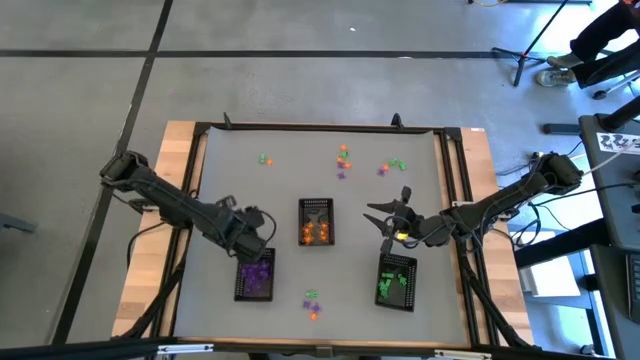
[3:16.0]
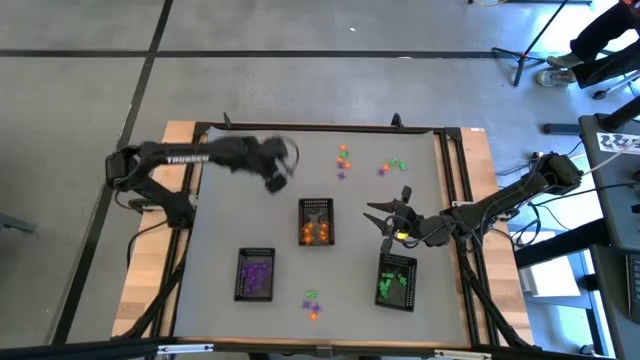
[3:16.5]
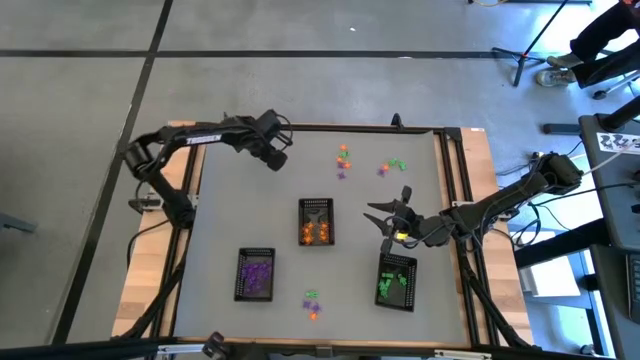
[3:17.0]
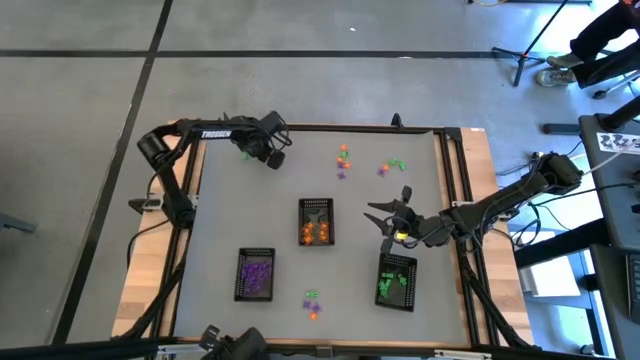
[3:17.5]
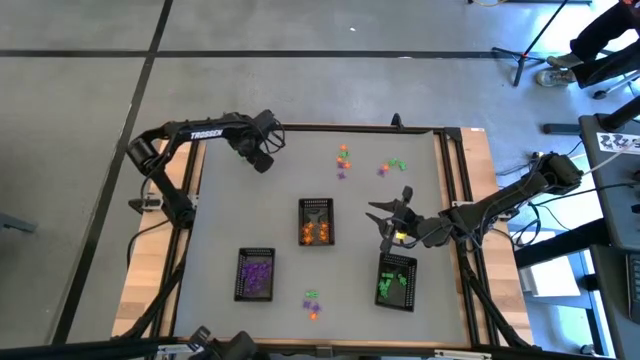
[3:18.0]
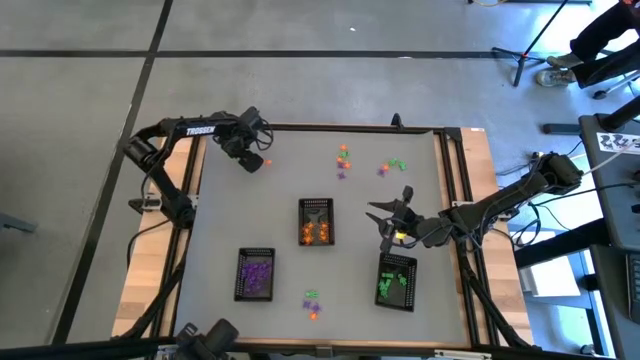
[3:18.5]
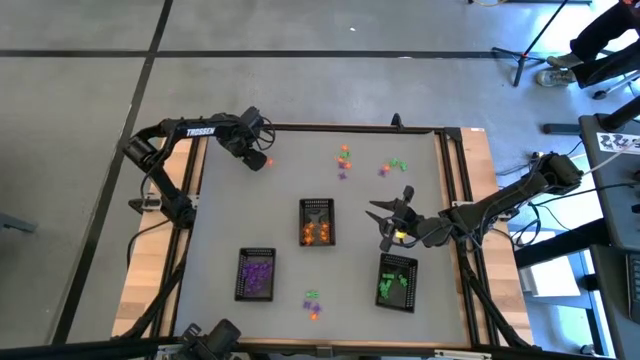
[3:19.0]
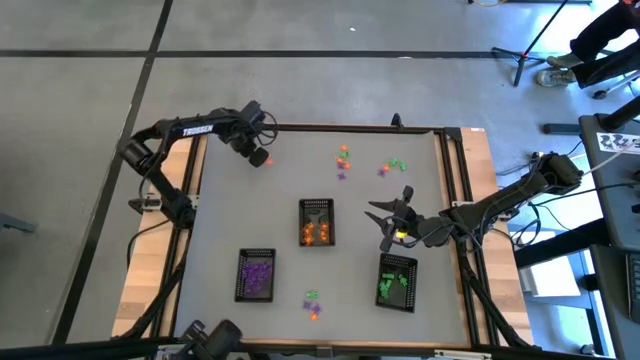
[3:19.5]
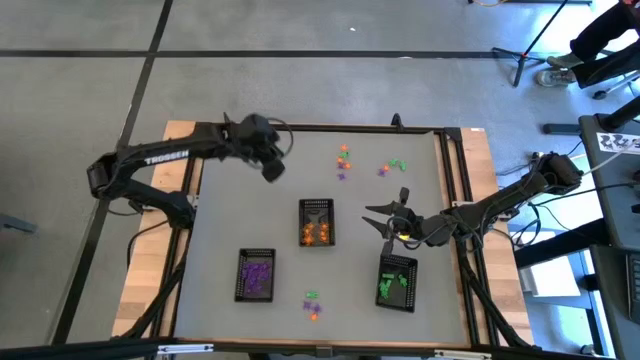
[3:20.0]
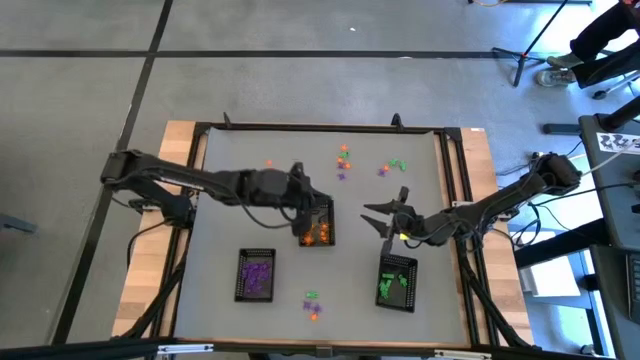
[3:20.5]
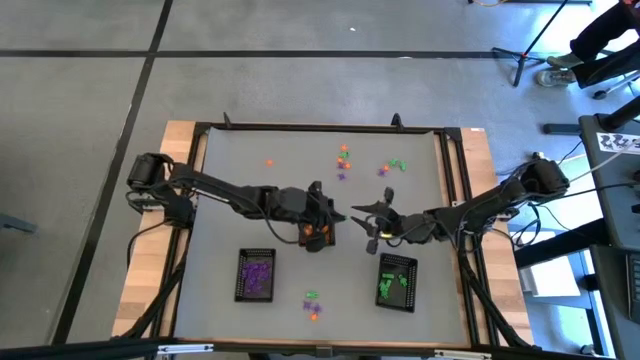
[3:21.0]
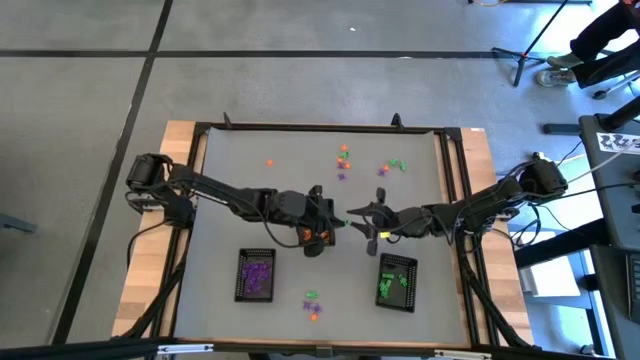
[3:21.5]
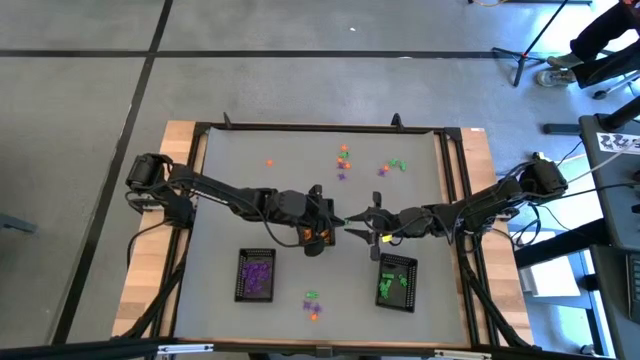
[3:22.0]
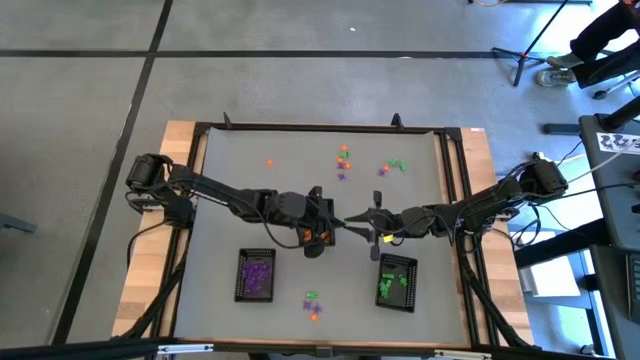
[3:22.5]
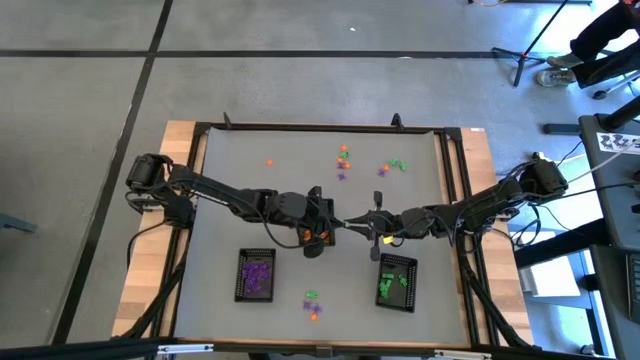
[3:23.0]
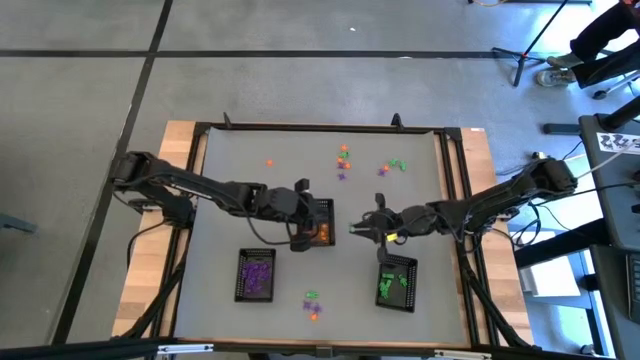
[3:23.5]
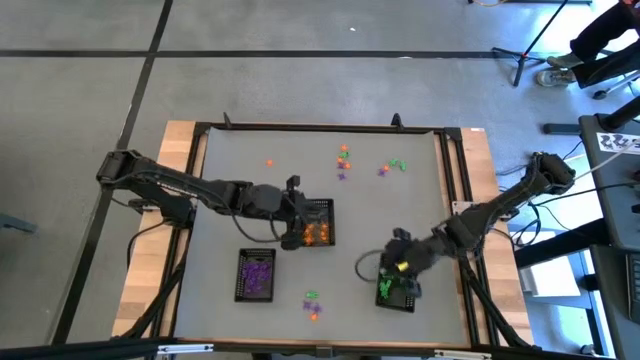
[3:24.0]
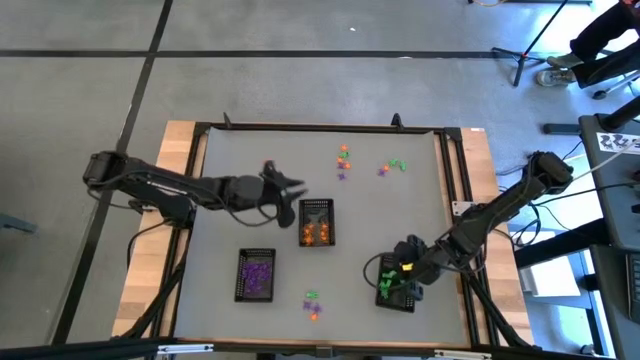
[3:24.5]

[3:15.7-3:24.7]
Task: Sort Halloween decoration
Put the green skeleton toy into the bottom right black bin

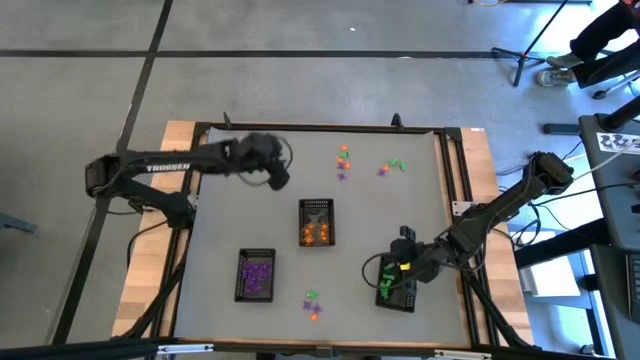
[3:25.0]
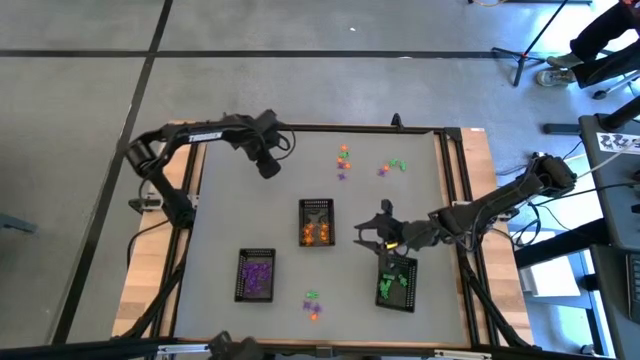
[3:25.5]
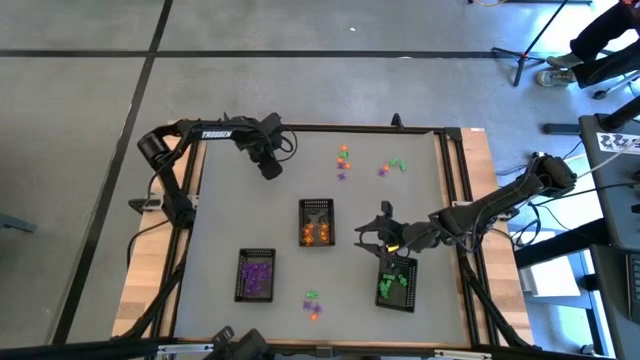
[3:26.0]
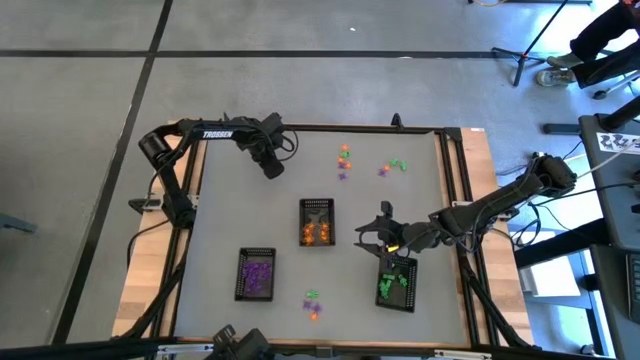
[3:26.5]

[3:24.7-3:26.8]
Put the orange spider toy into the top black bin

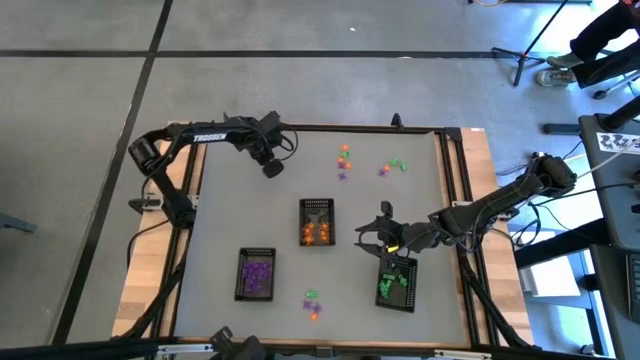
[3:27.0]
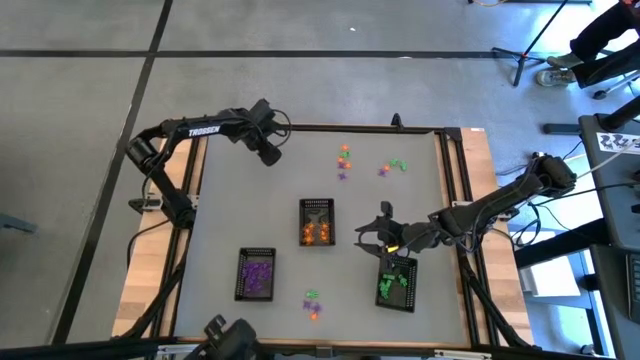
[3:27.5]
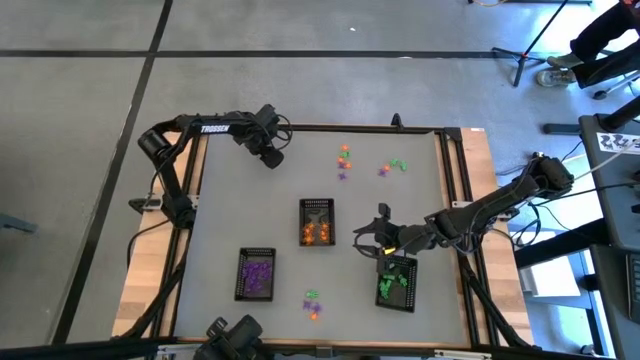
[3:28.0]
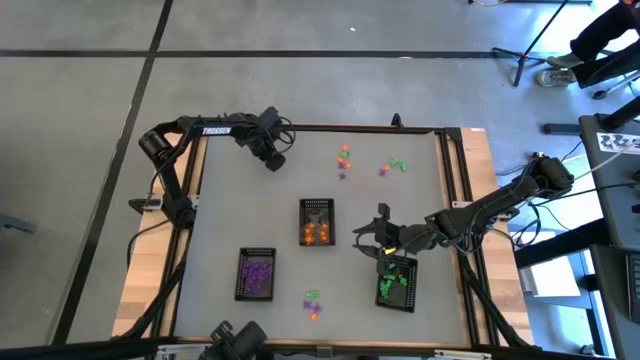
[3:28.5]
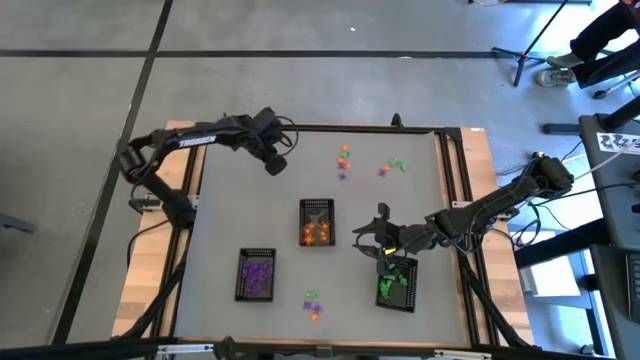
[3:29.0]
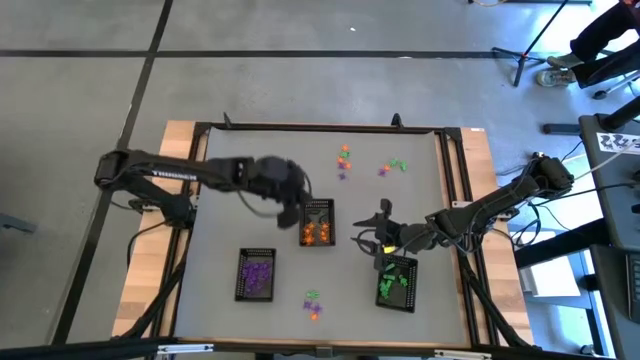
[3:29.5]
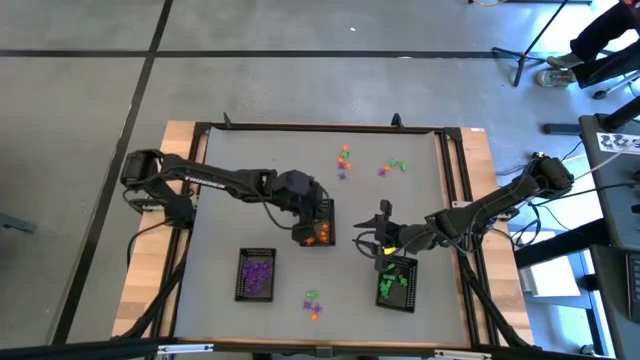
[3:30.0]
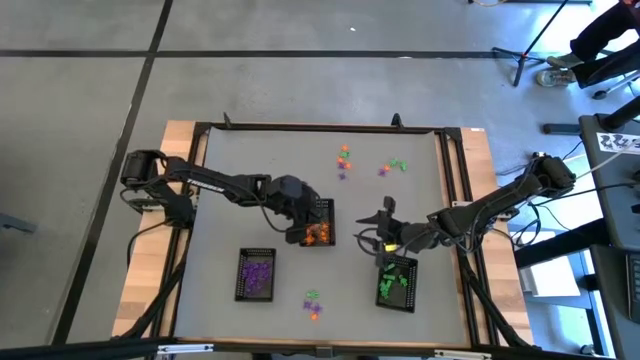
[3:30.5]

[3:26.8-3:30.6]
Put the orange spider toy into the top black bin

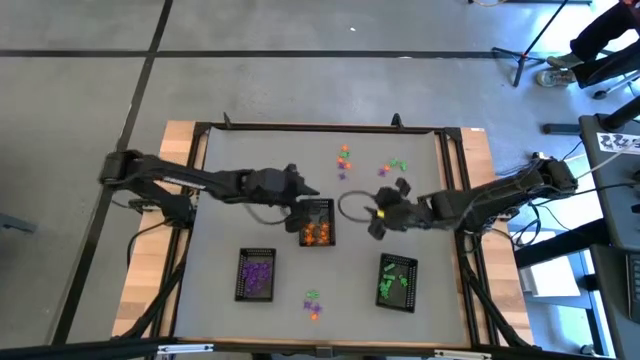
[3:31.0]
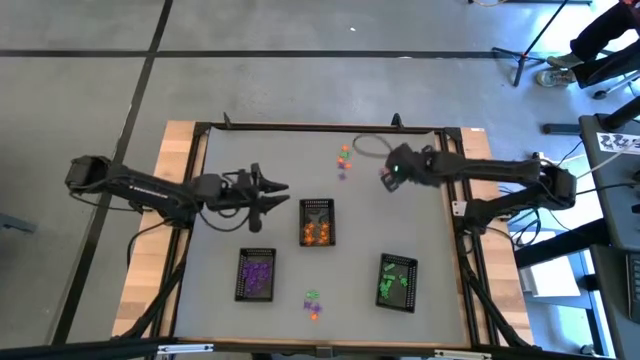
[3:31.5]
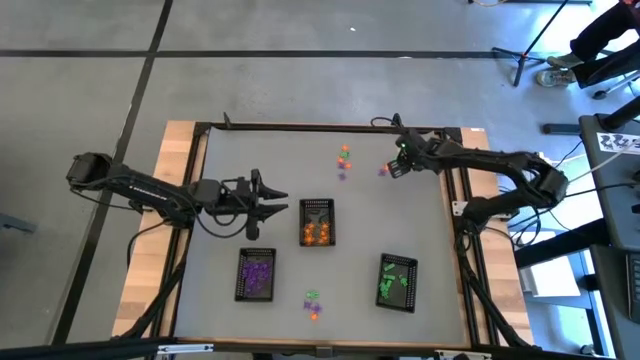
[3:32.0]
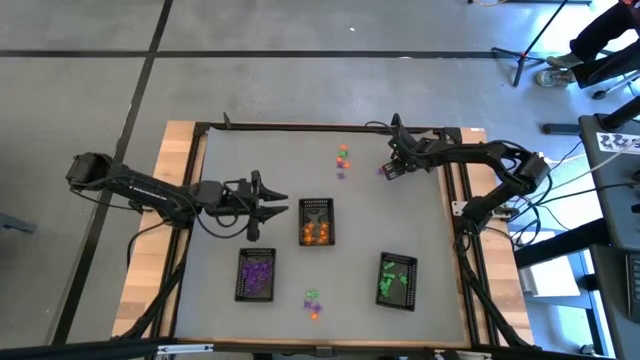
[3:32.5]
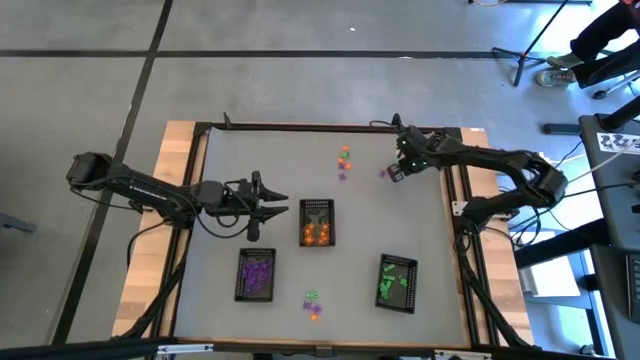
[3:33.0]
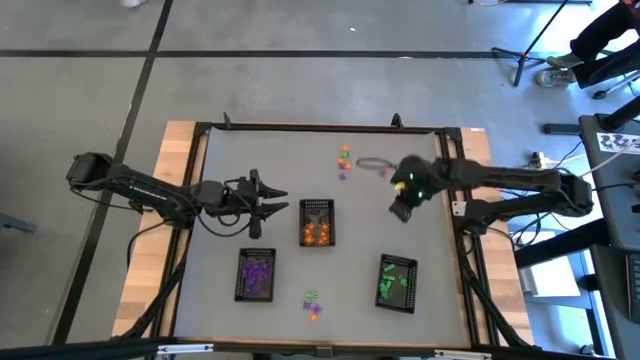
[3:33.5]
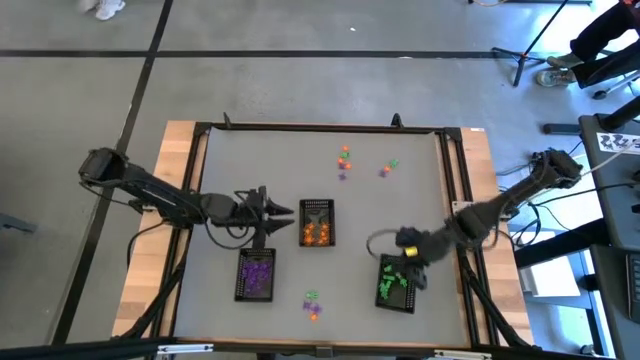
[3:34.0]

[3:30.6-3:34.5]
Put the green skeleton toy into the bottom right black bin

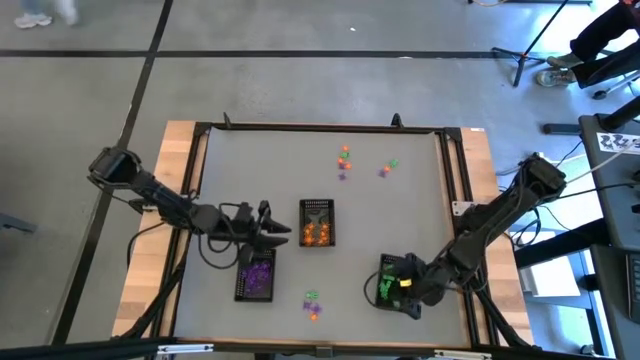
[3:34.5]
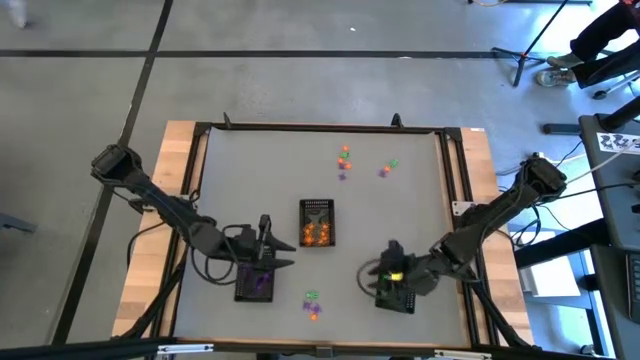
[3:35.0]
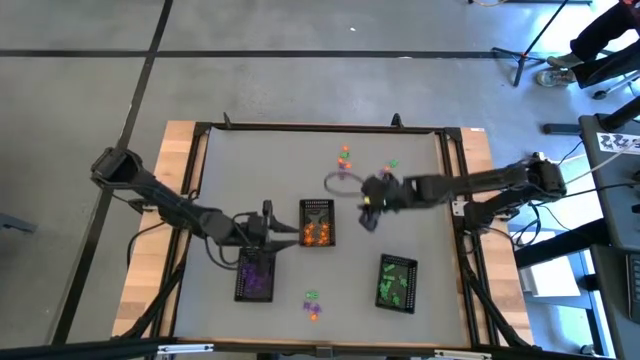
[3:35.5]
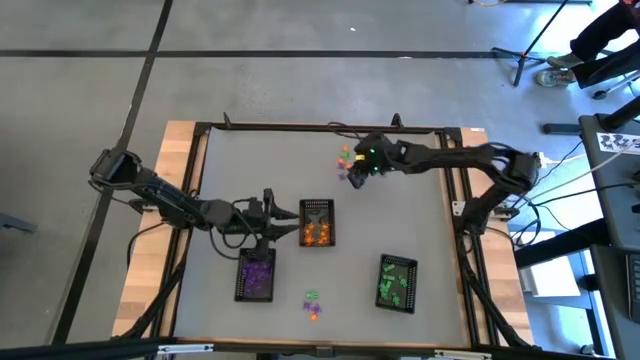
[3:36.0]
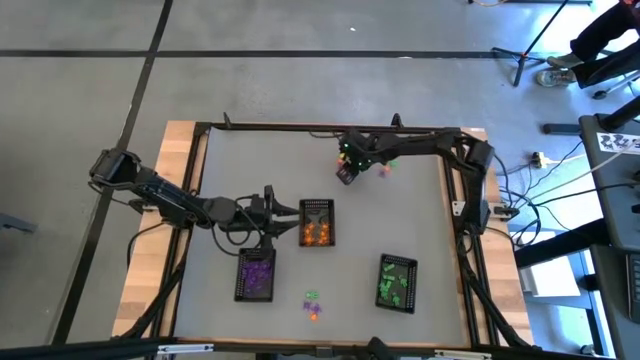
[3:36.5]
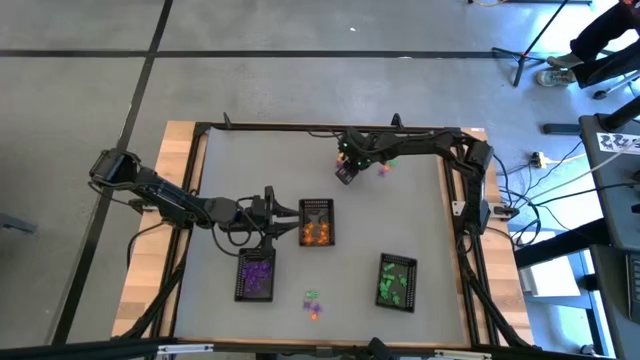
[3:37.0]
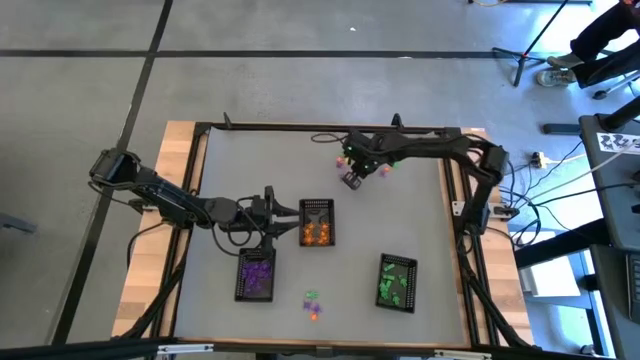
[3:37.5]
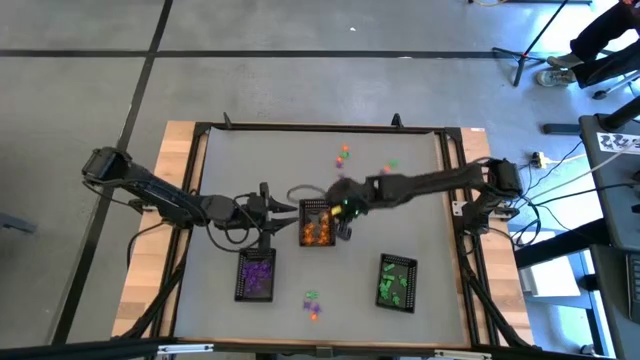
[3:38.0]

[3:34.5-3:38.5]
Put the orange spider toy into the top black bin
